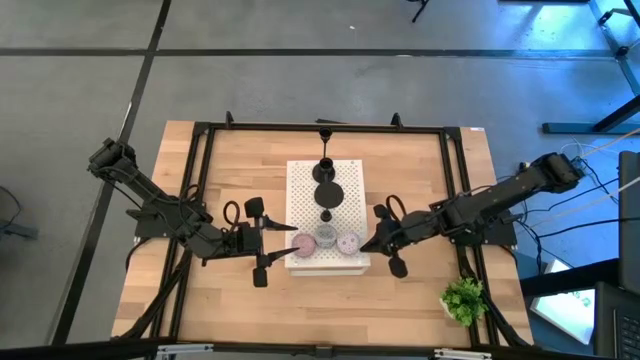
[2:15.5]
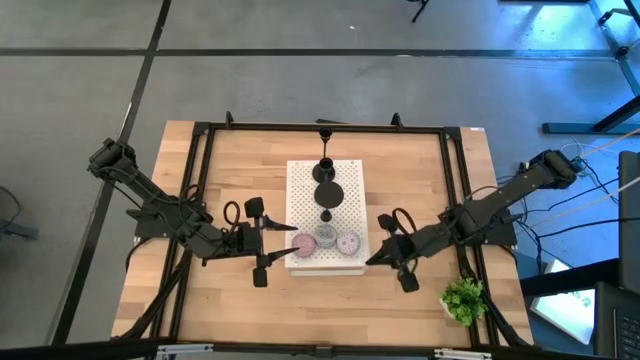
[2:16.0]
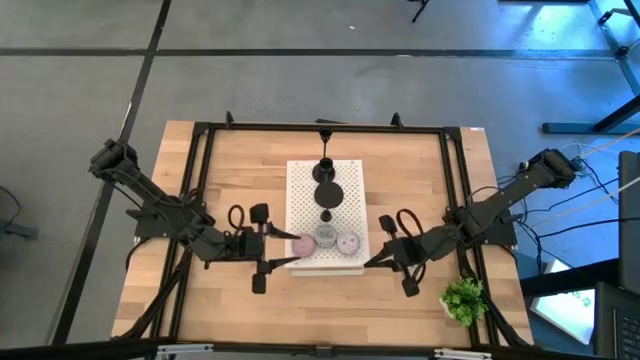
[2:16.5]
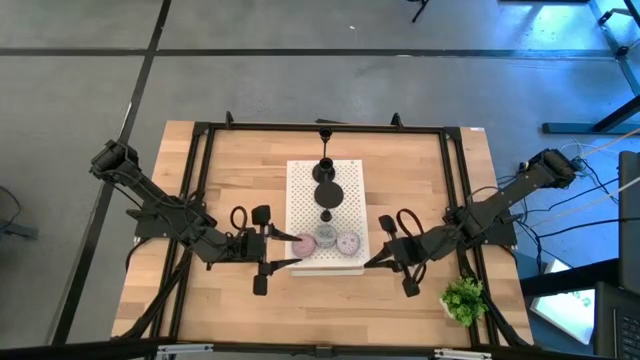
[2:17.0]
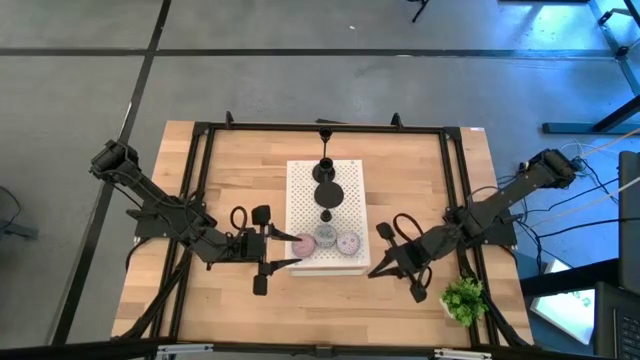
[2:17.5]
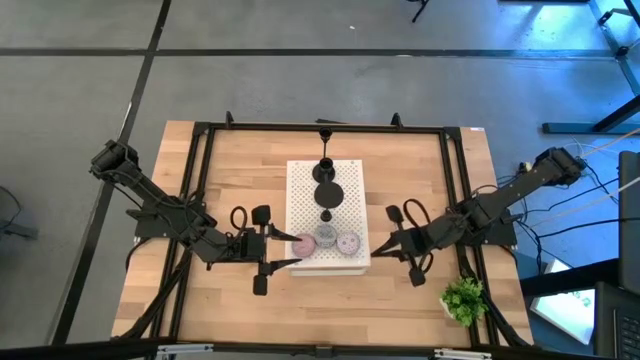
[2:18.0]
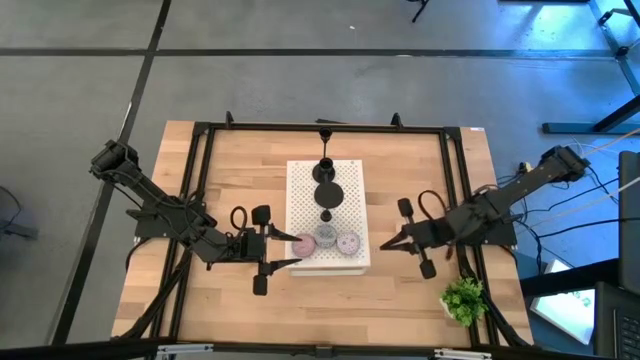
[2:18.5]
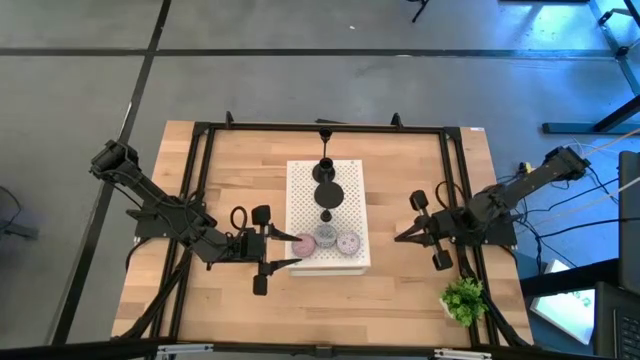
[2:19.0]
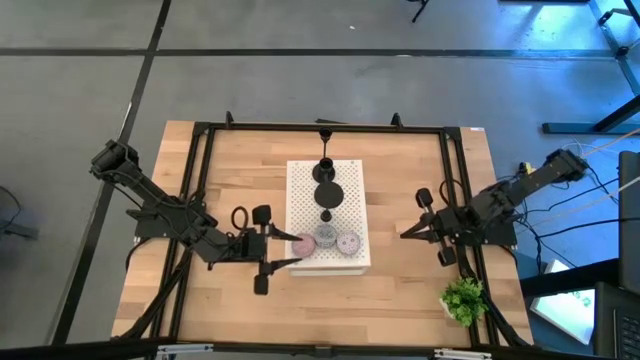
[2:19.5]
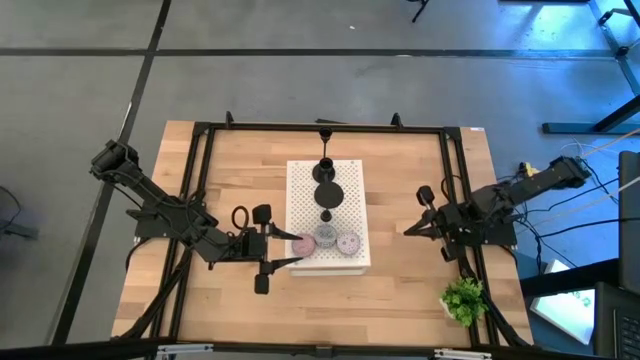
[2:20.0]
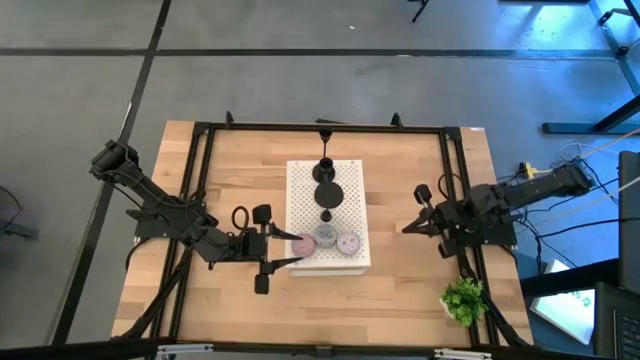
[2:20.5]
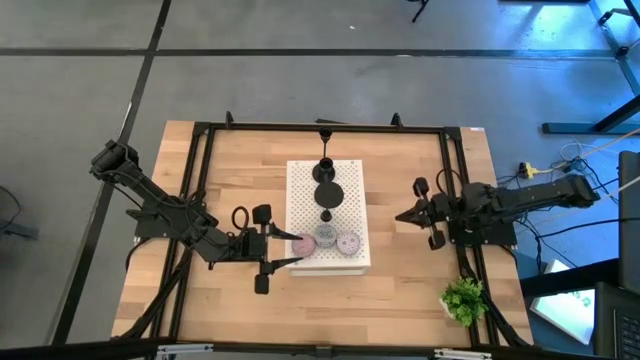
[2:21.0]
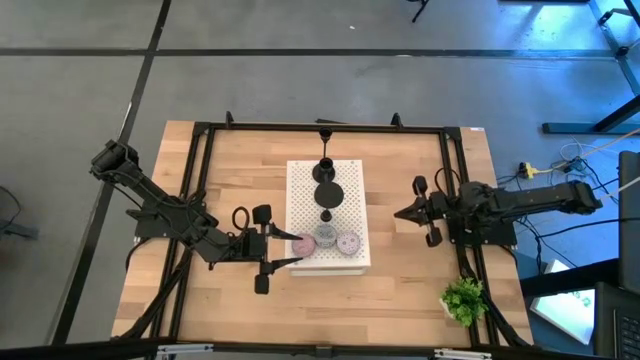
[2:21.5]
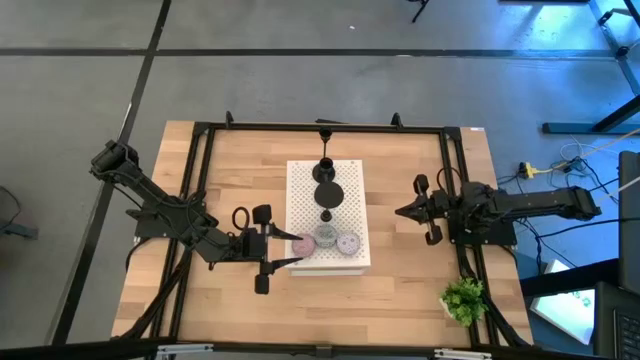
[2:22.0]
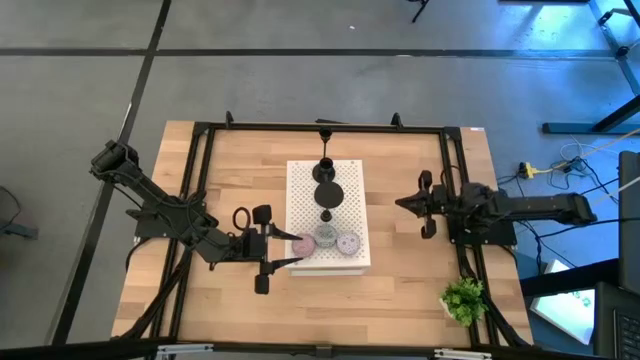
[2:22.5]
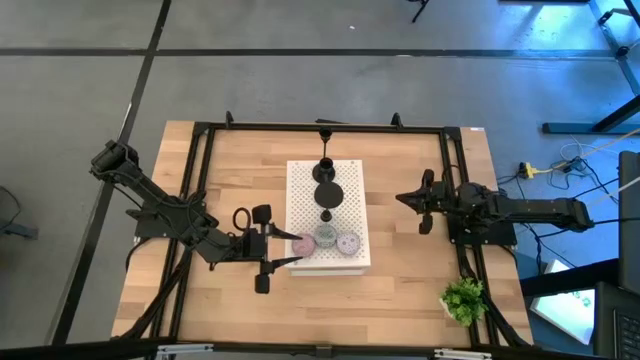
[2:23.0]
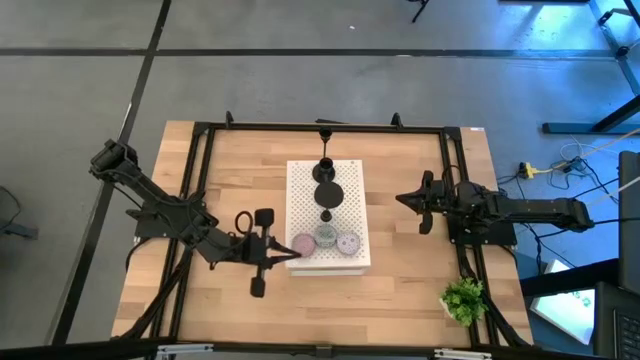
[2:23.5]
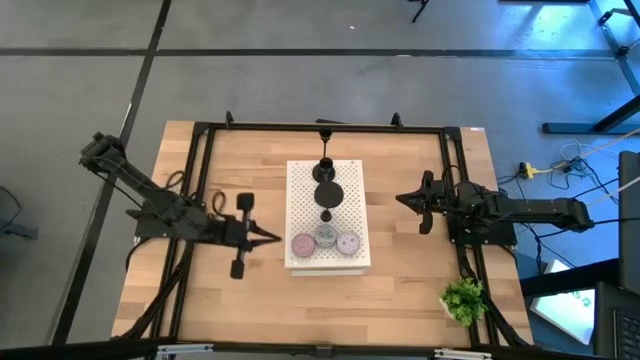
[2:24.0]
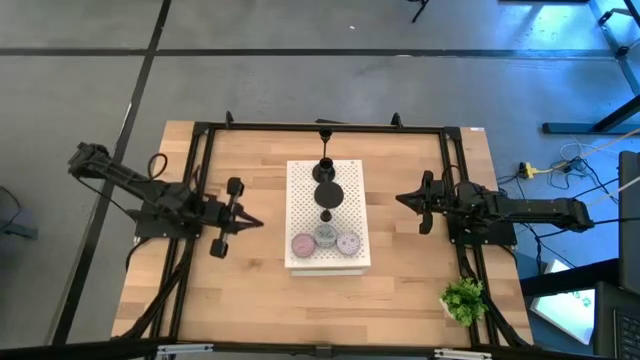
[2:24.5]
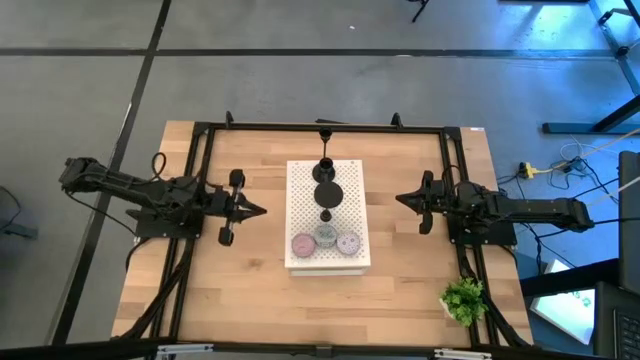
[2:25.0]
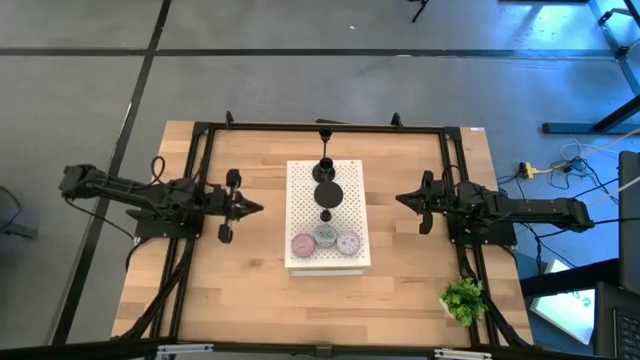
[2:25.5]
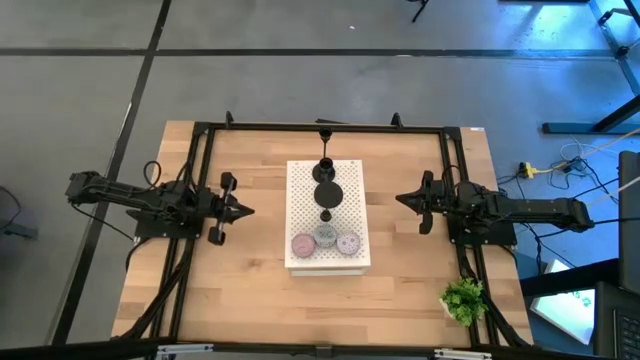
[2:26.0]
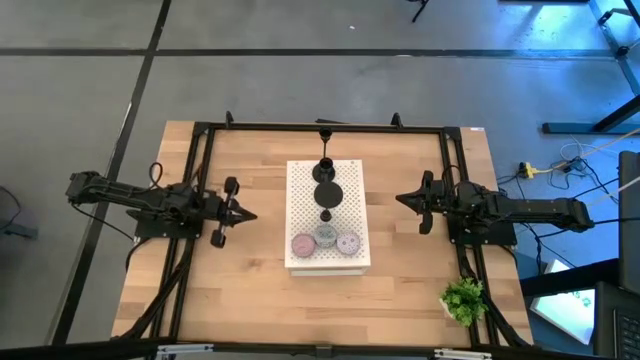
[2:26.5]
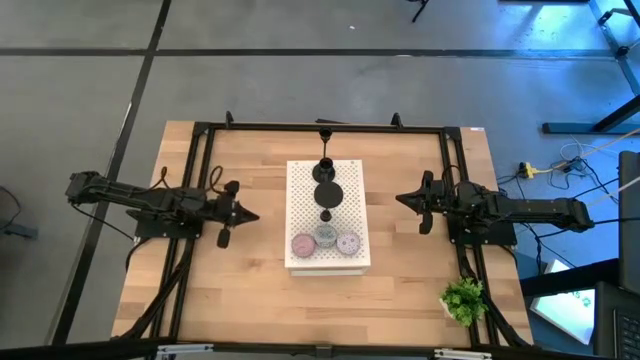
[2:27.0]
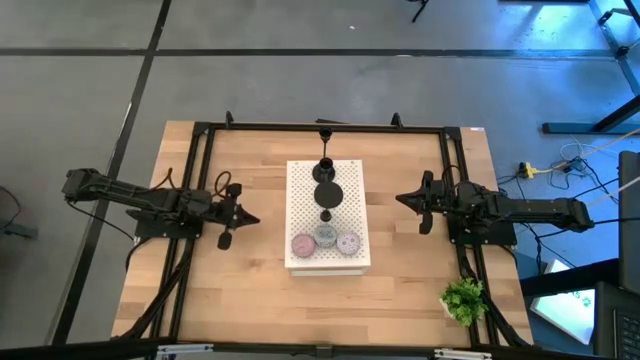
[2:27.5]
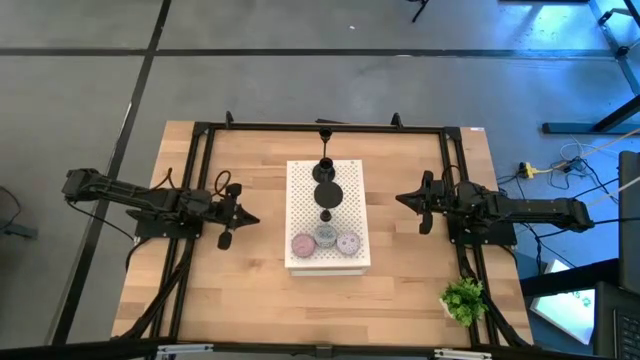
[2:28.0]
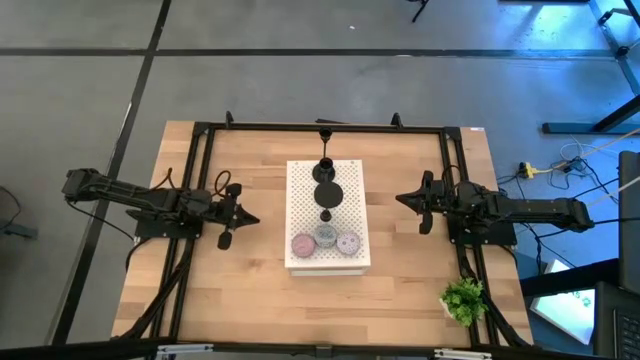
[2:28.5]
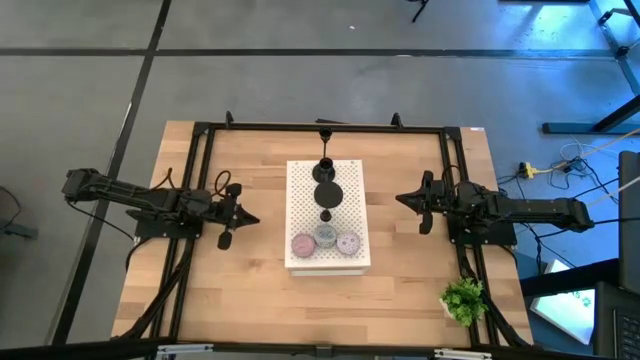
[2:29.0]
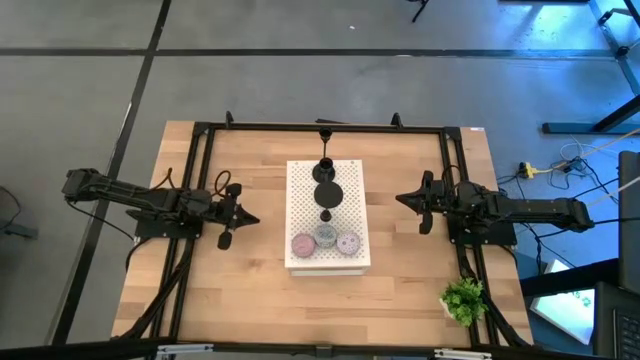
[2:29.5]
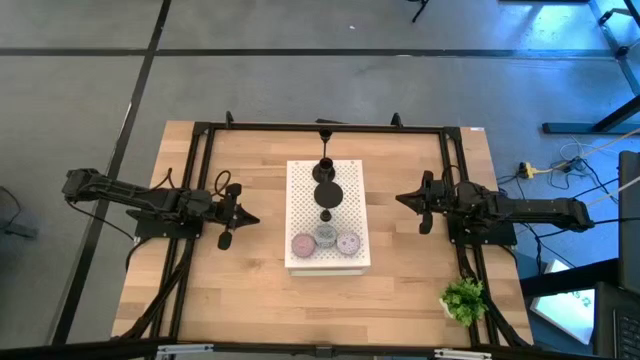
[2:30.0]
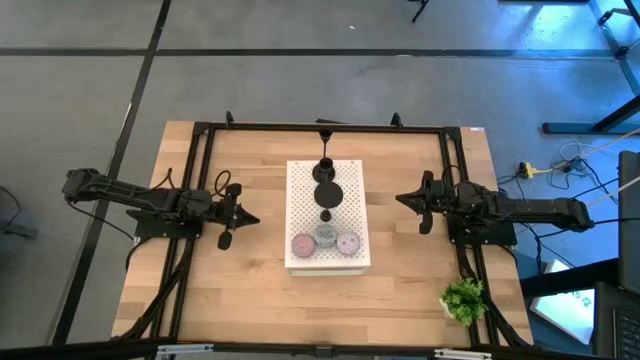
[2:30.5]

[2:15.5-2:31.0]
Task: Pick & Place candle stick holders
Return to Home Position

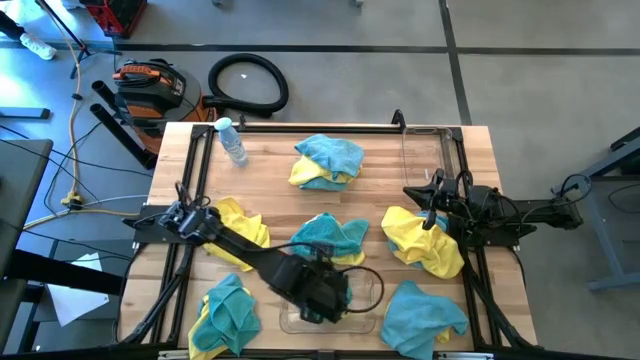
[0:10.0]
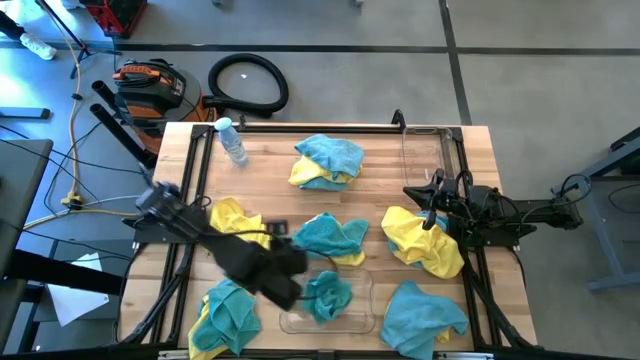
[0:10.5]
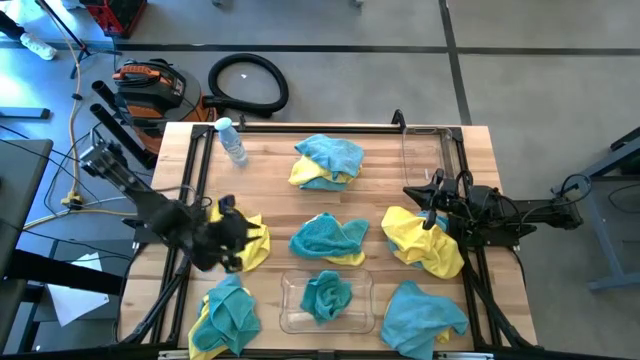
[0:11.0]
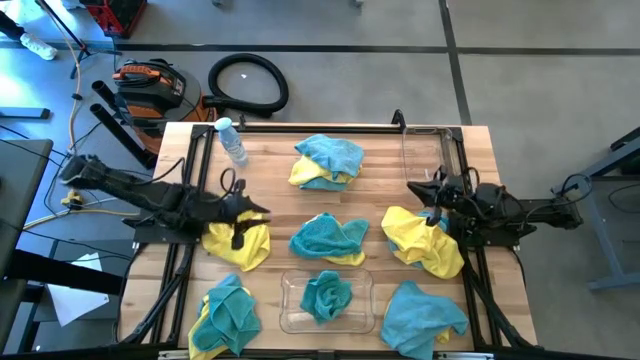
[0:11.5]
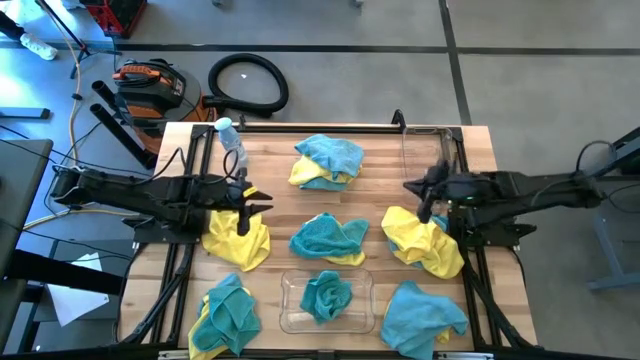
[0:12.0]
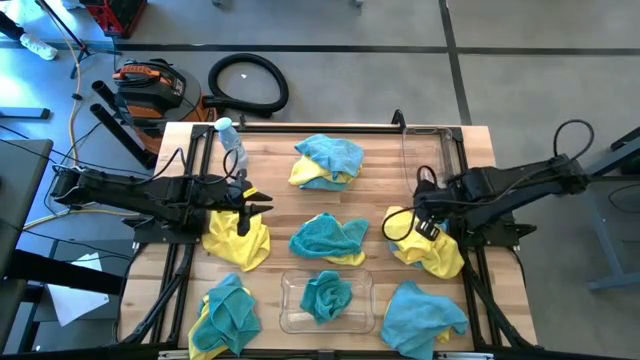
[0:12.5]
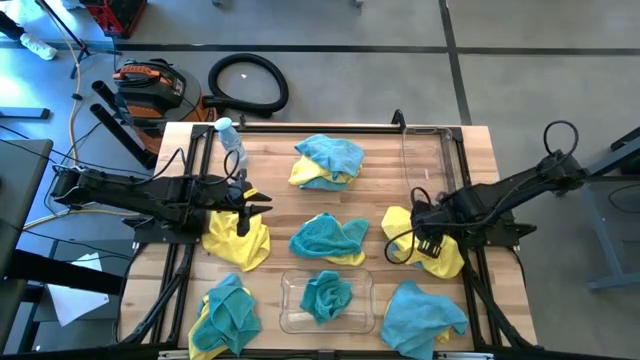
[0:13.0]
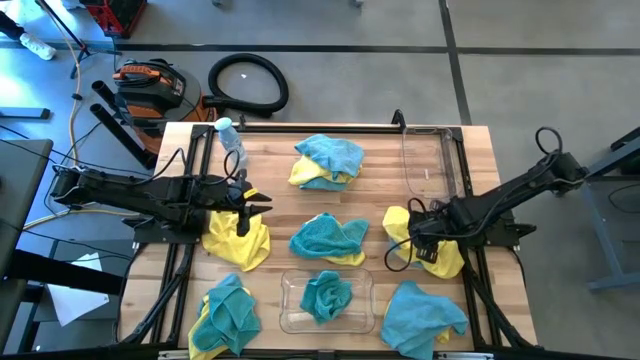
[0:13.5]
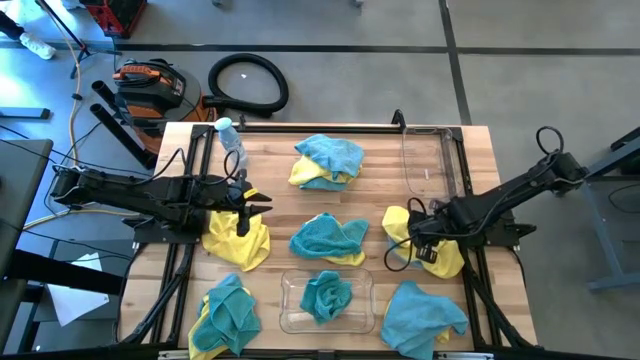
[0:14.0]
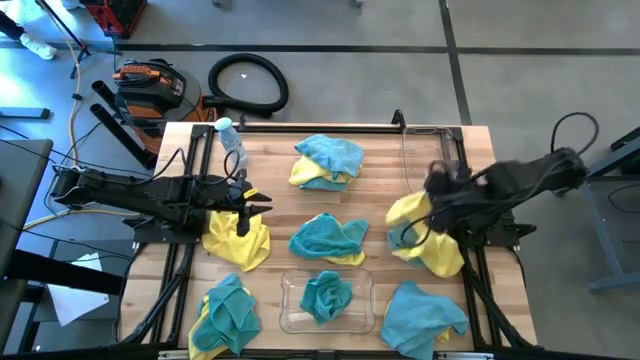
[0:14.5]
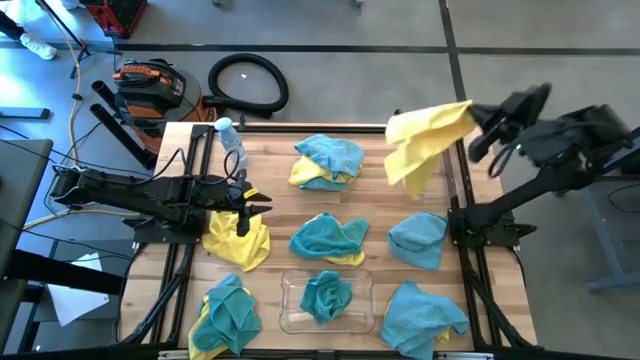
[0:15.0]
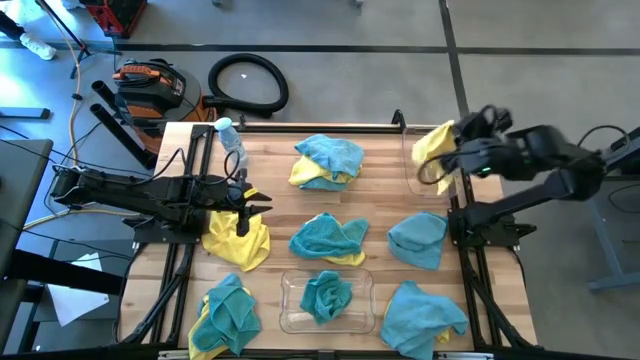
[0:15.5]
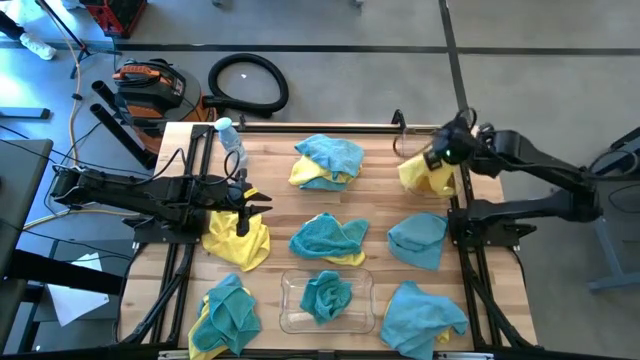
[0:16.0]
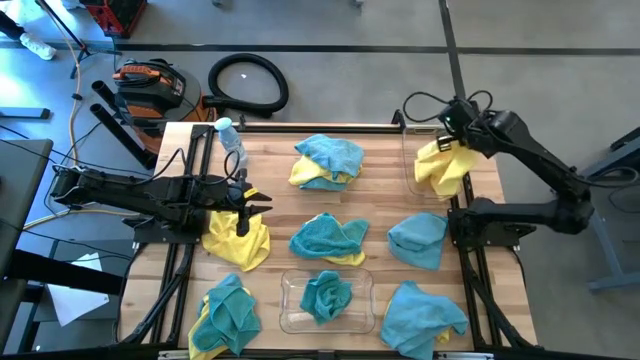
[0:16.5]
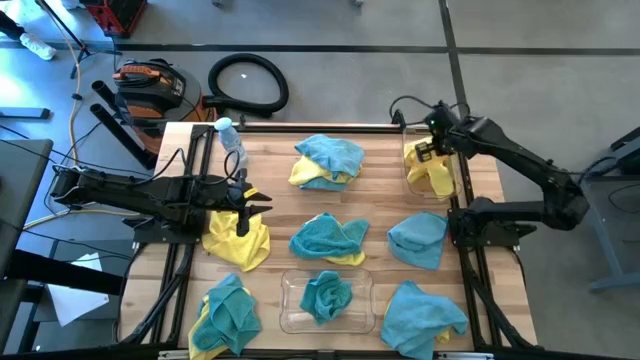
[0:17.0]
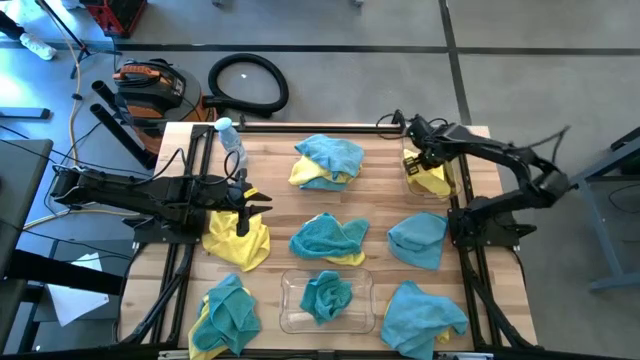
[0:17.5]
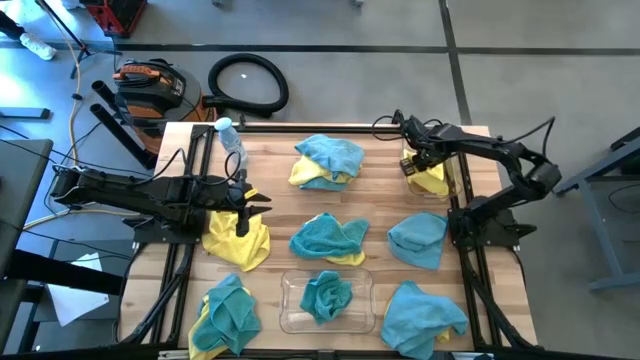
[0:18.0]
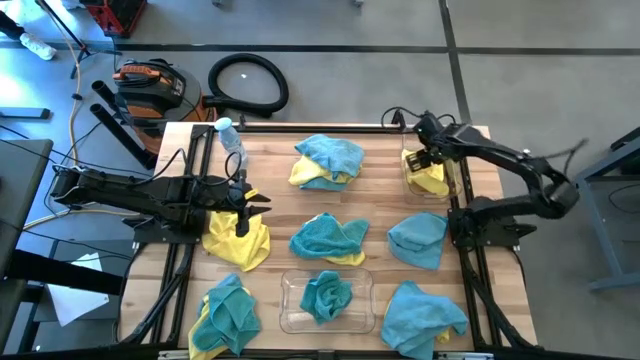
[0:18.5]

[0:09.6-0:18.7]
Task: Sort microfiber towel by color & place in baskets
Put the yellow microfiber towel into the top transparent bin
